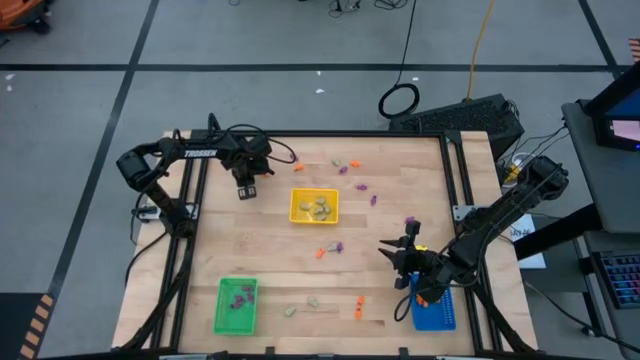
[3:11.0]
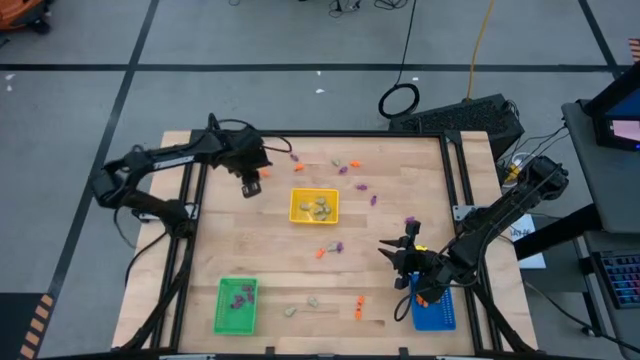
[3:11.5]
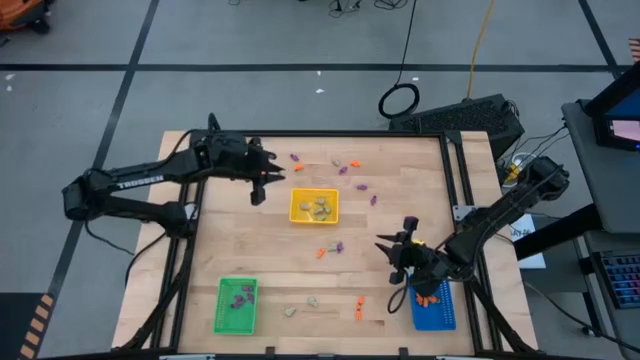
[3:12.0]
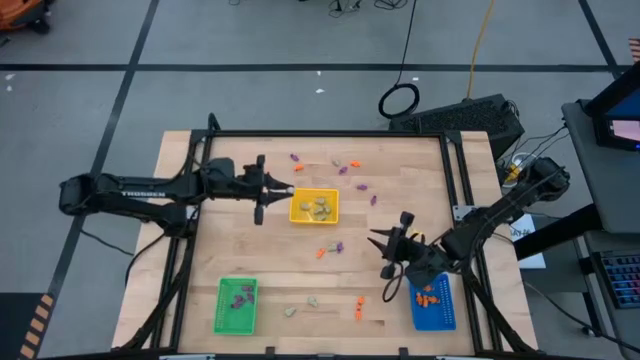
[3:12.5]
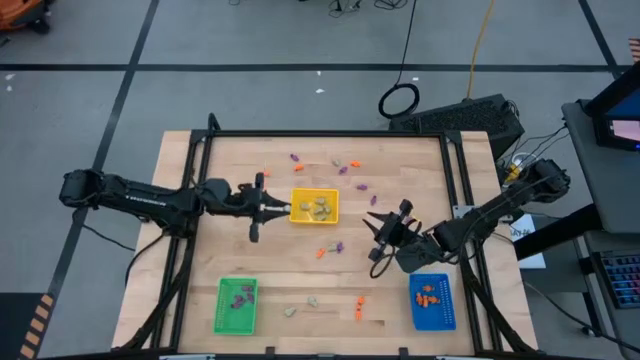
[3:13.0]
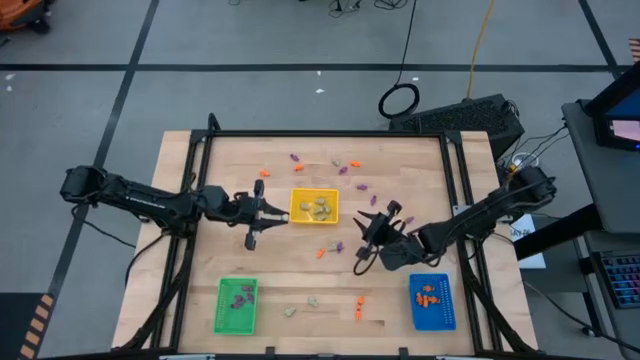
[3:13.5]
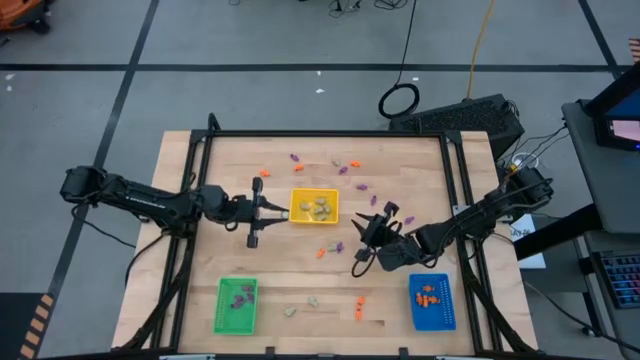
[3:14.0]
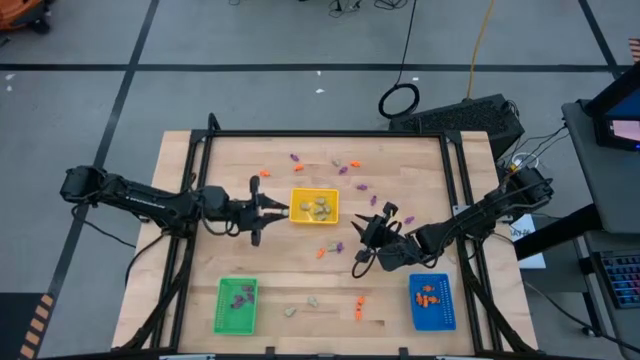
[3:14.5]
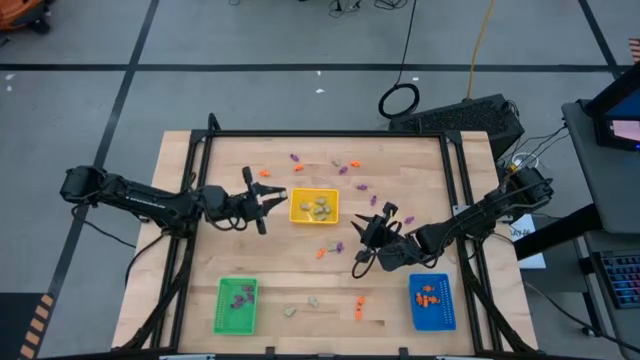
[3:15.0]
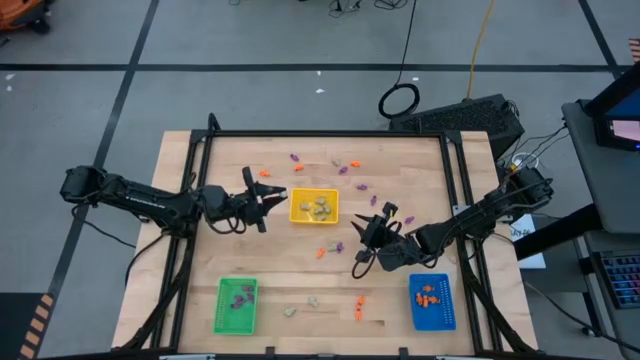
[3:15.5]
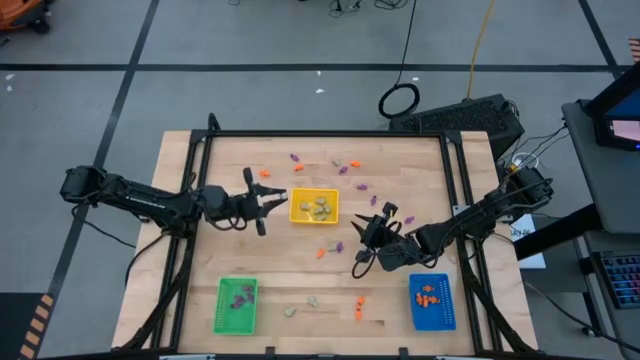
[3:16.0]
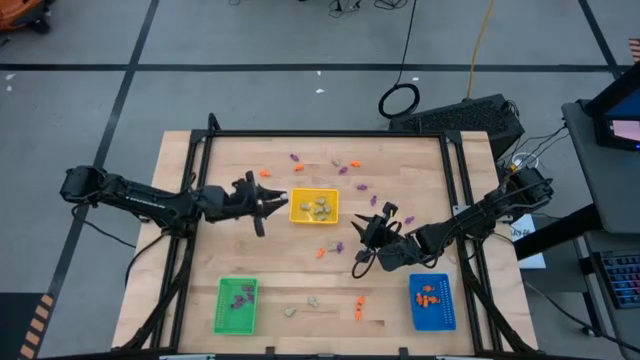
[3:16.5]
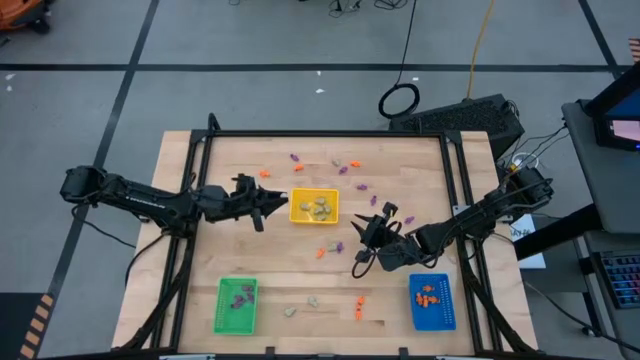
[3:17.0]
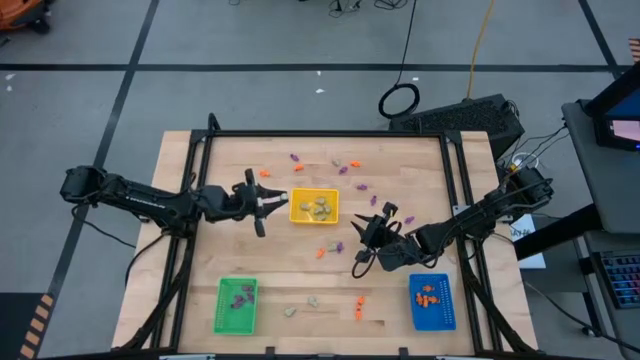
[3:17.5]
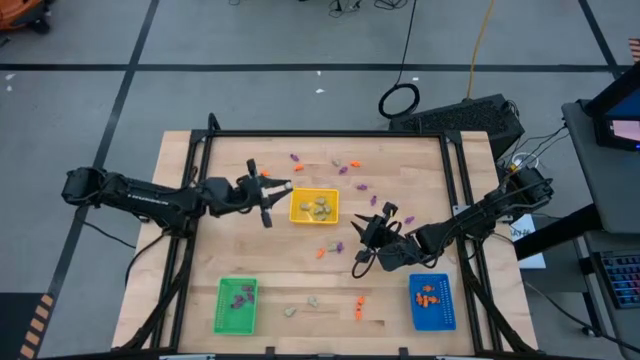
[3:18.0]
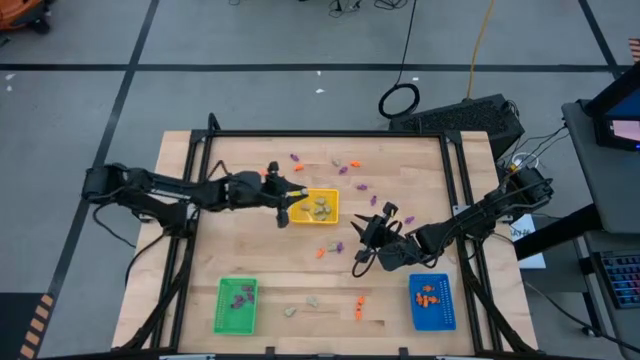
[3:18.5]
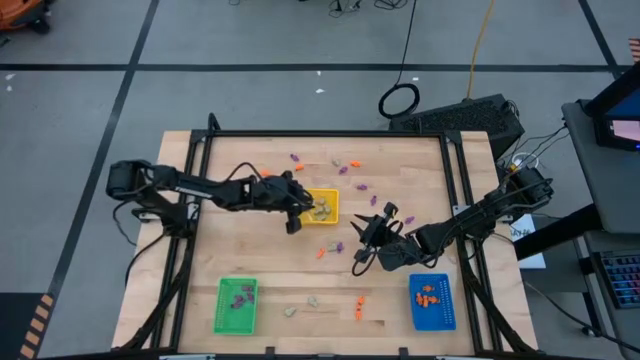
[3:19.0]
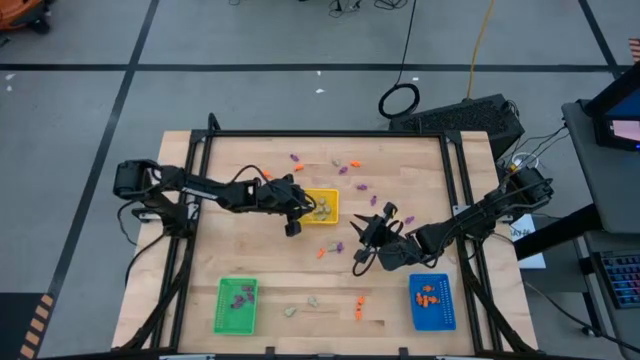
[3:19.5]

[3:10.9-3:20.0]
Task: Sort Halloween decoration
Put the white skull toy in the yellow basket

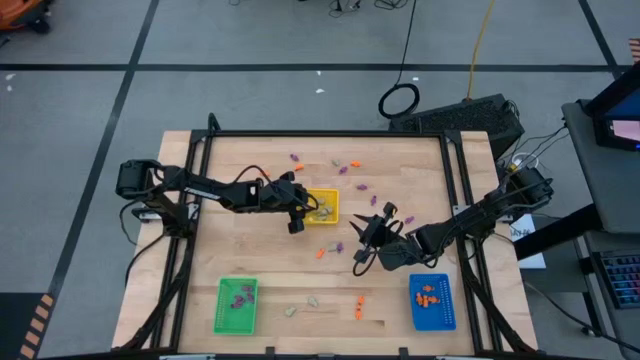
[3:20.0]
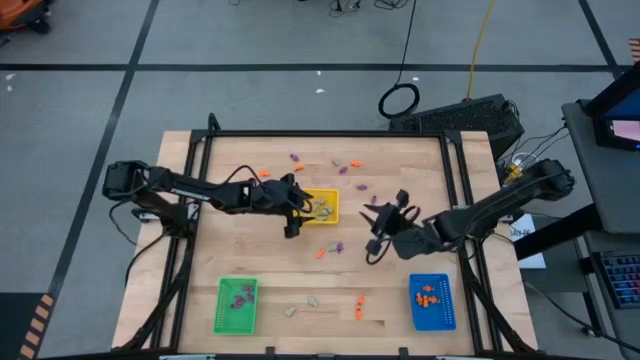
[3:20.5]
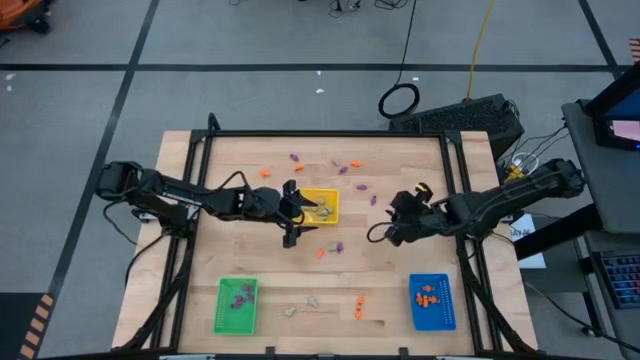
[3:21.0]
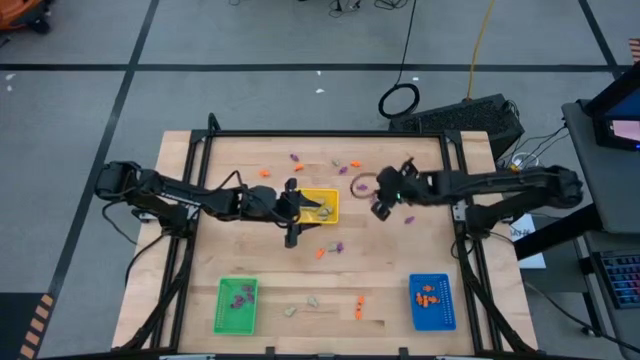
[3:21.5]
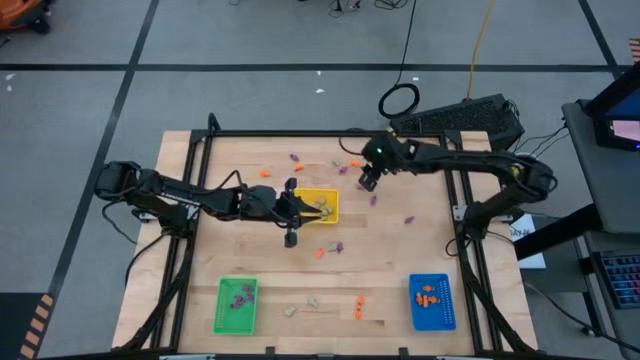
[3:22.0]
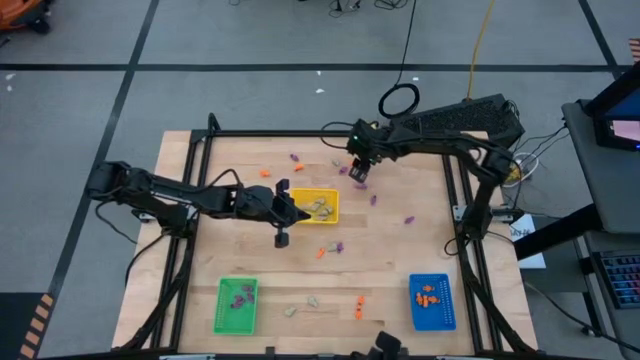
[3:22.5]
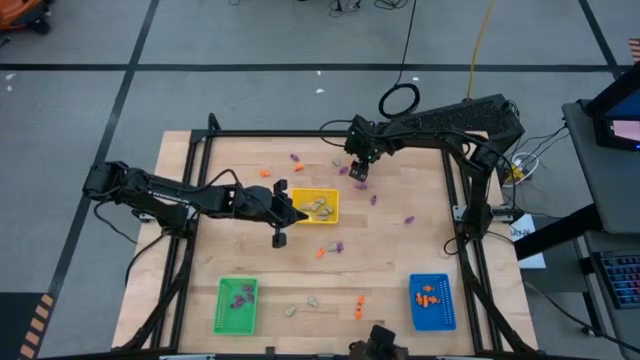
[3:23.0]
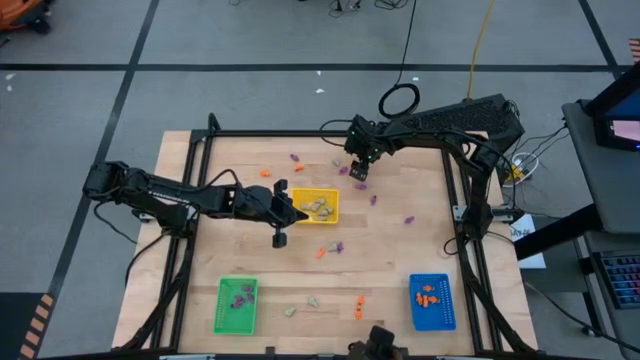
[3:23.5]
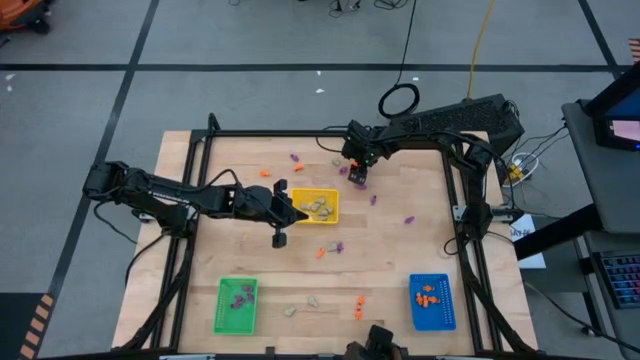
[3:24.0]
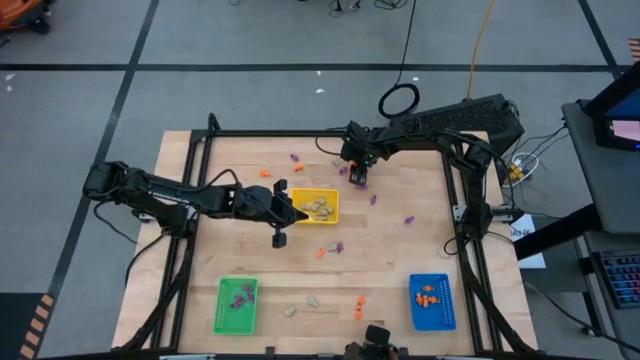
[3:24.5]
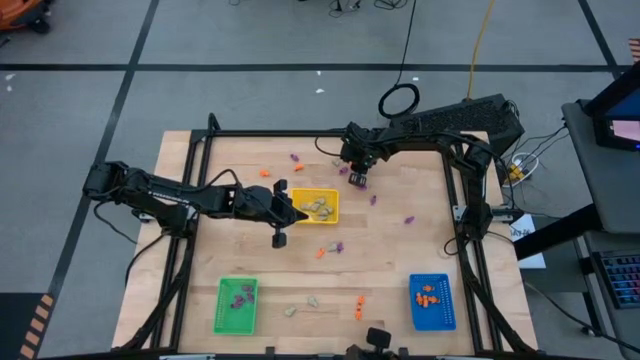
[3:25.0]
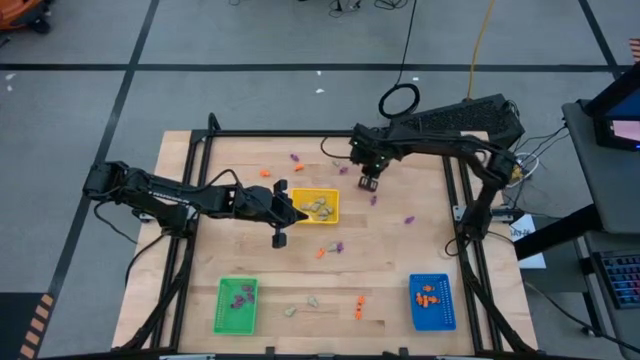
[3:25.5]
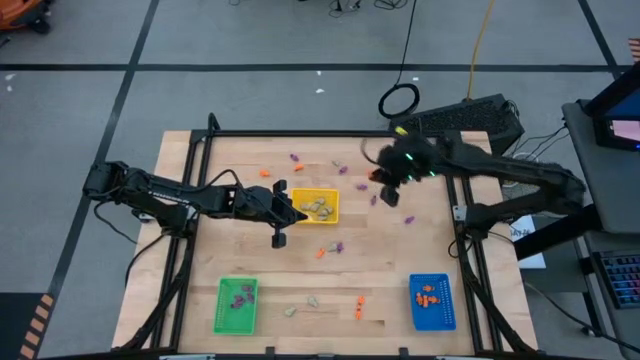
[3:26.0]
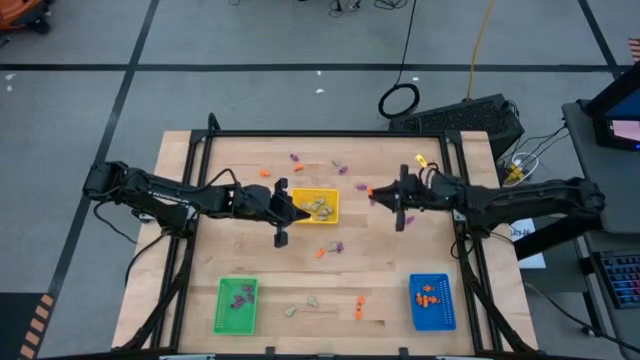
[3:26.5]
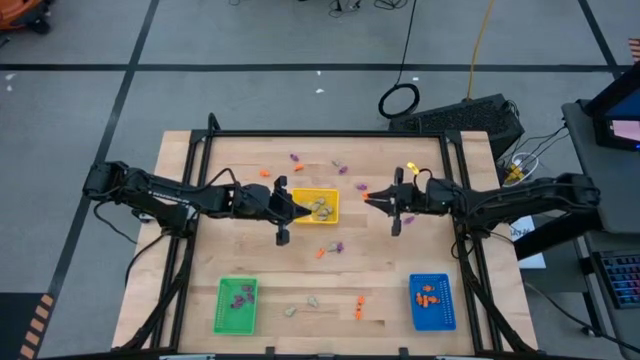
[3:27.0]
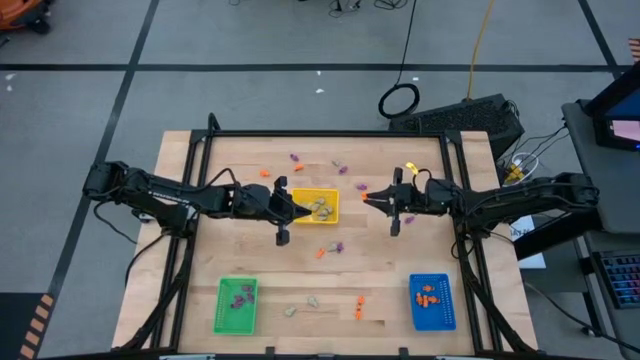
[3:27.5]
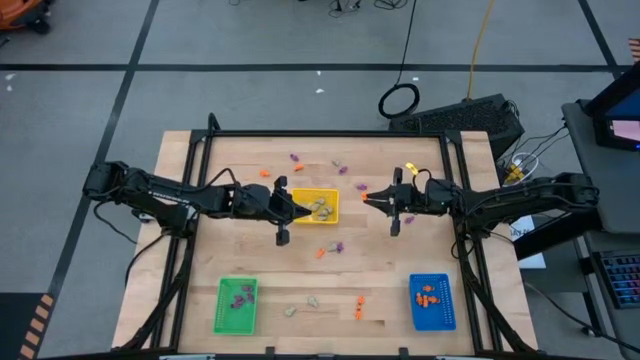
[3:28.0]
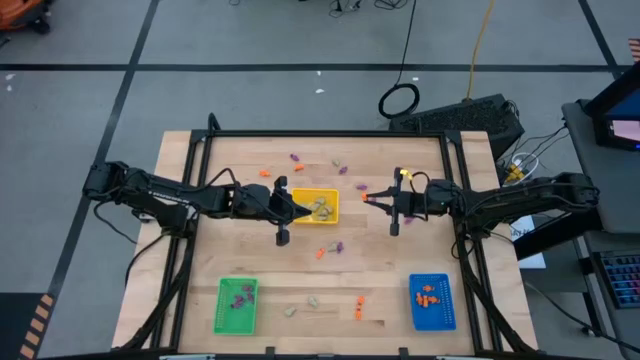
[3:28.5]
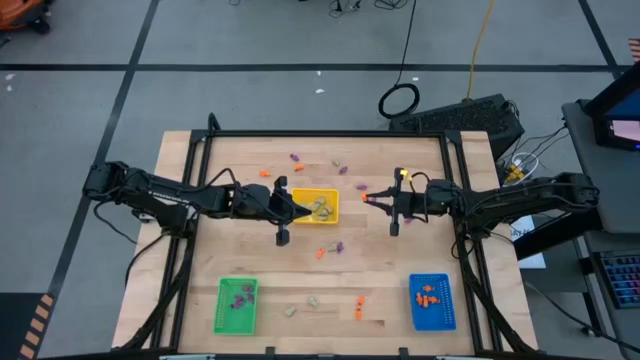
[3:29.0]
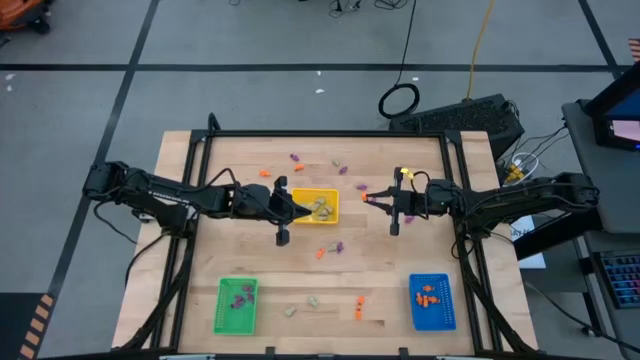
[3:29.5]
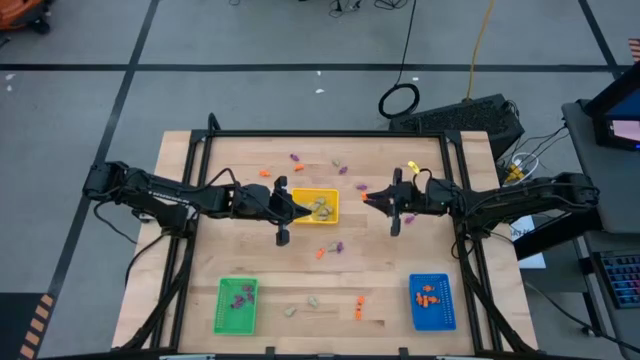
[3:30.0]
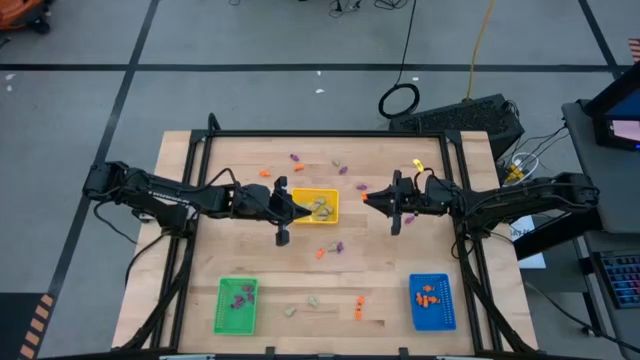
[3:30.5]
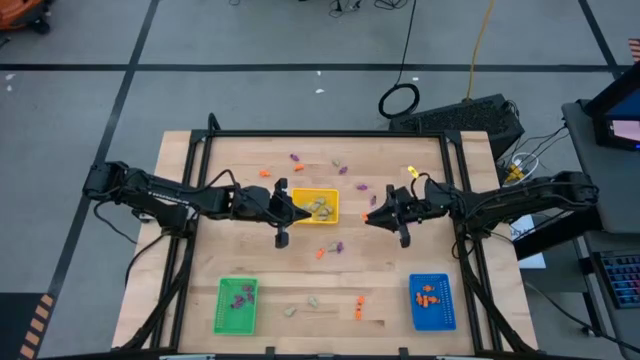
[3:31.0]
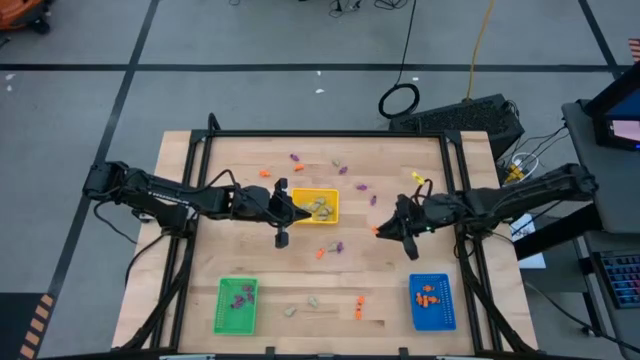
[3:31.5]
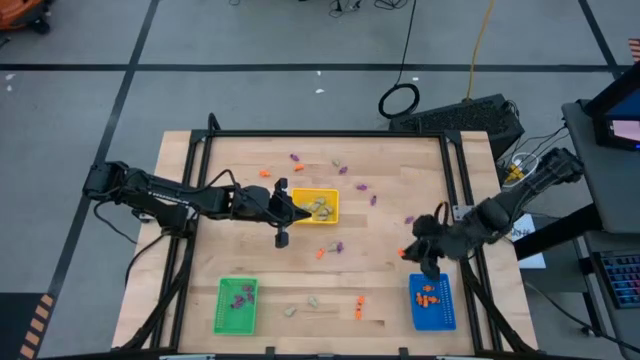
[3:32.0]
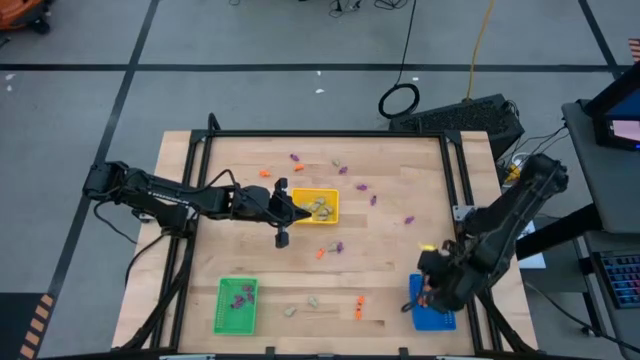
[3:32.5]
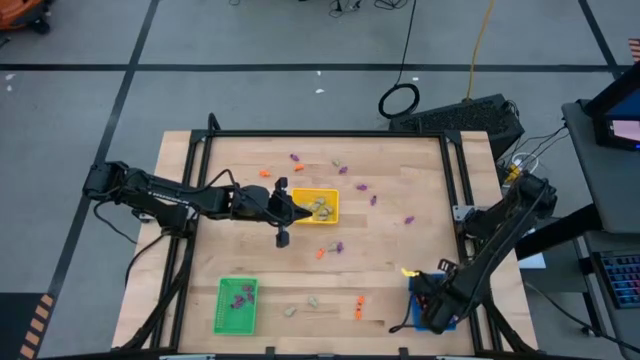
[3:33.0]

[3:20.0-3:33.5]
Put the orange skeleton toy in the blue basket
